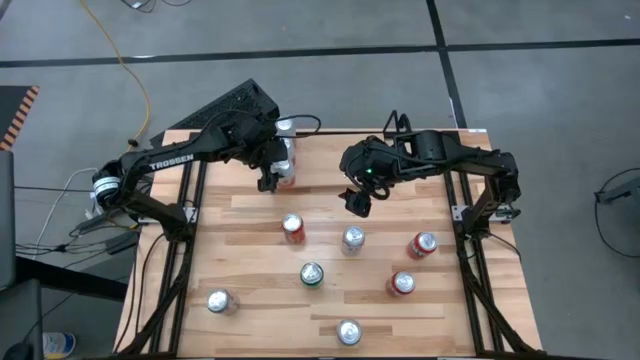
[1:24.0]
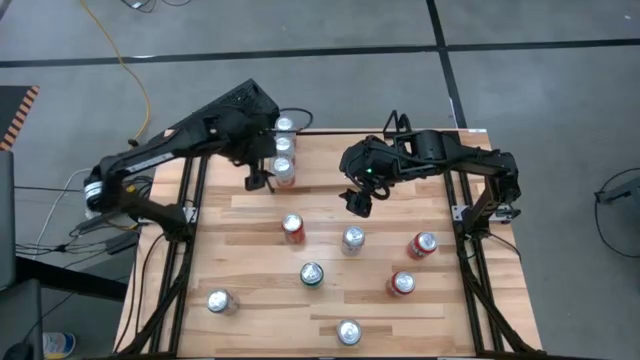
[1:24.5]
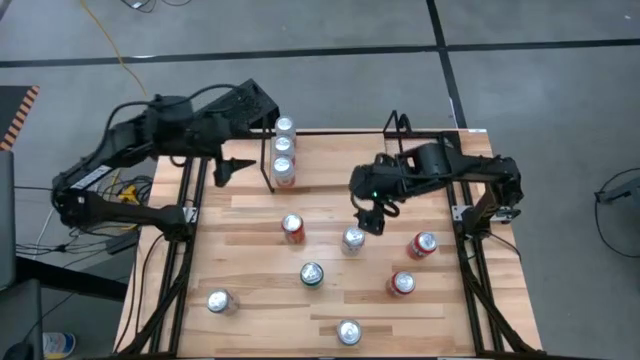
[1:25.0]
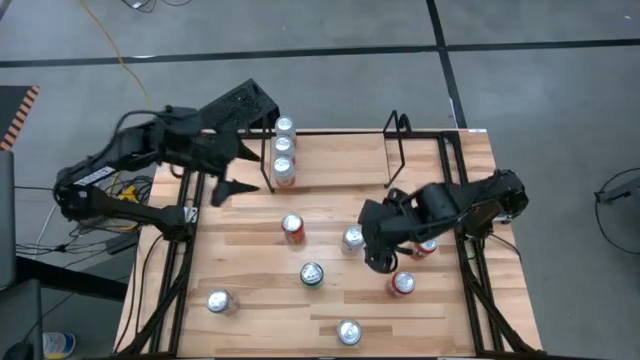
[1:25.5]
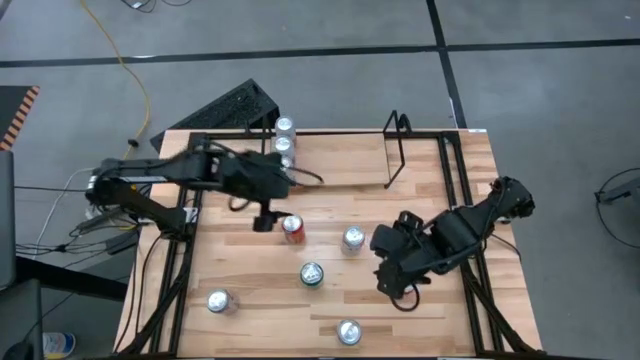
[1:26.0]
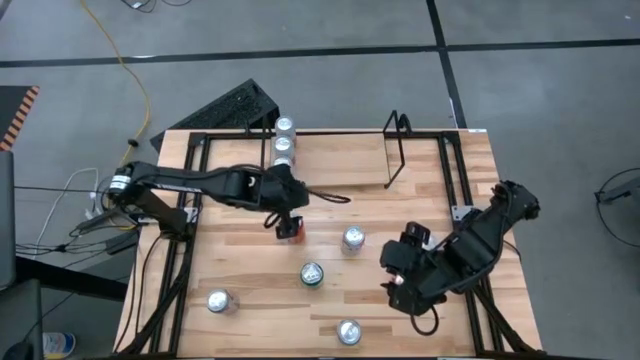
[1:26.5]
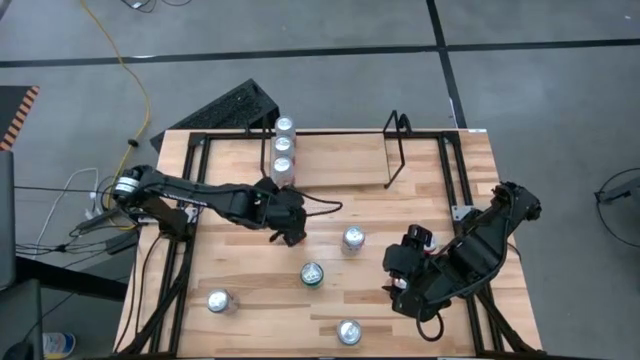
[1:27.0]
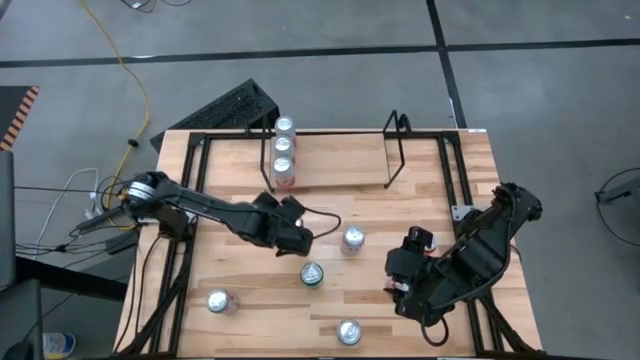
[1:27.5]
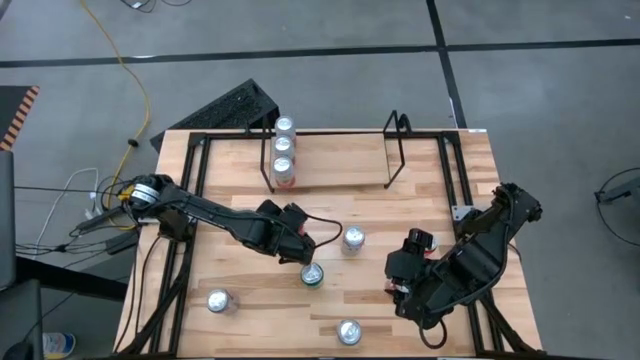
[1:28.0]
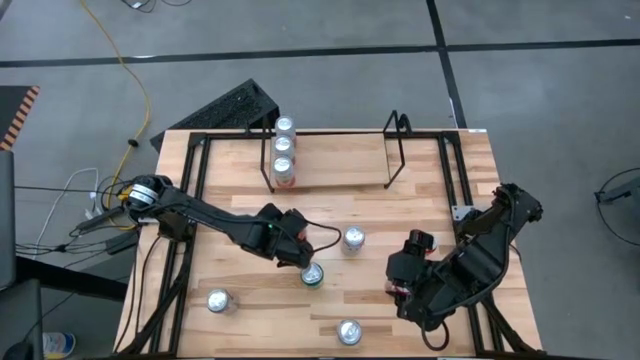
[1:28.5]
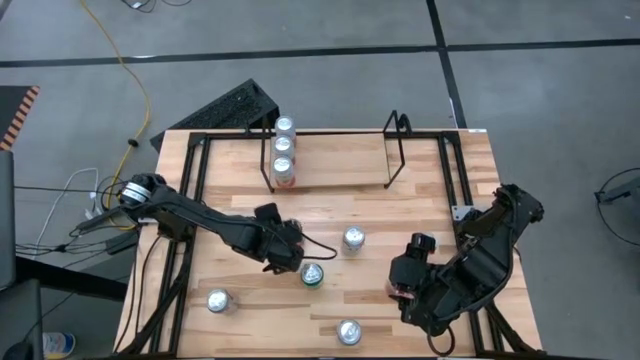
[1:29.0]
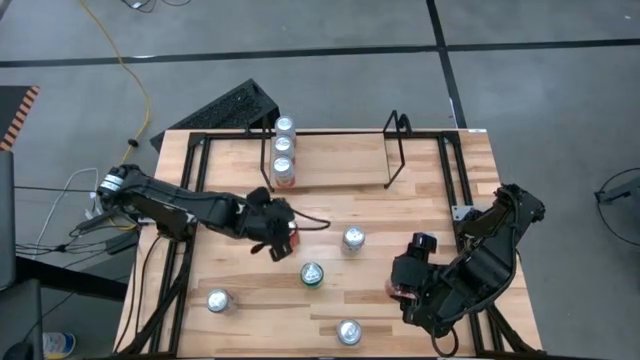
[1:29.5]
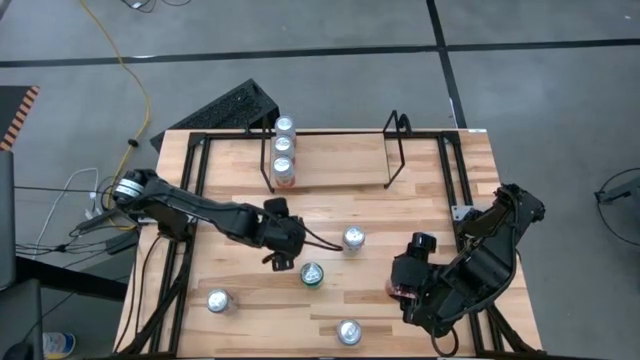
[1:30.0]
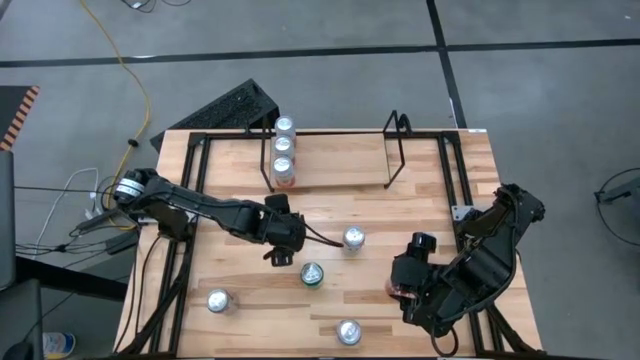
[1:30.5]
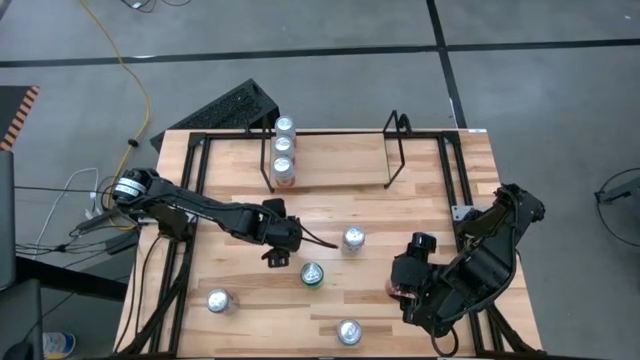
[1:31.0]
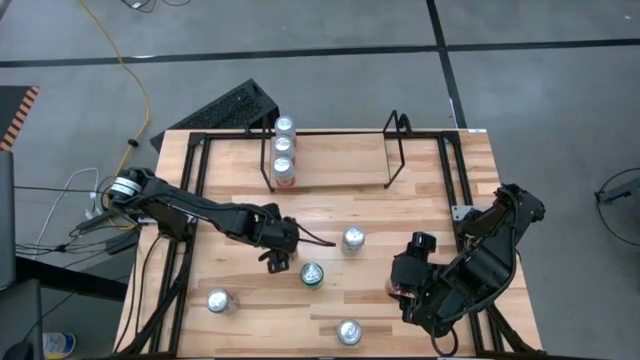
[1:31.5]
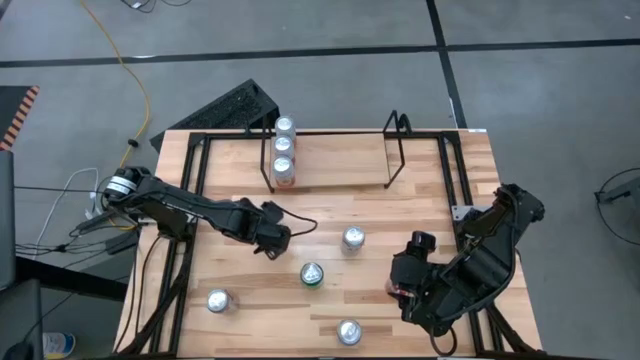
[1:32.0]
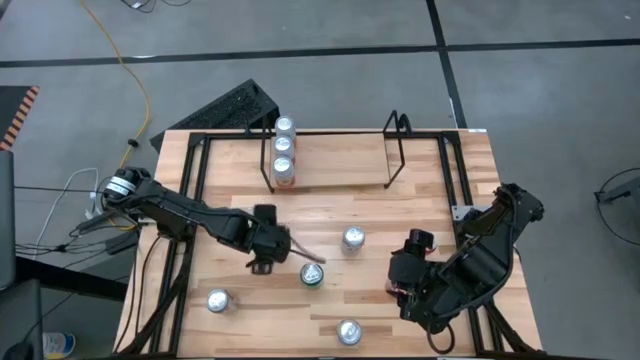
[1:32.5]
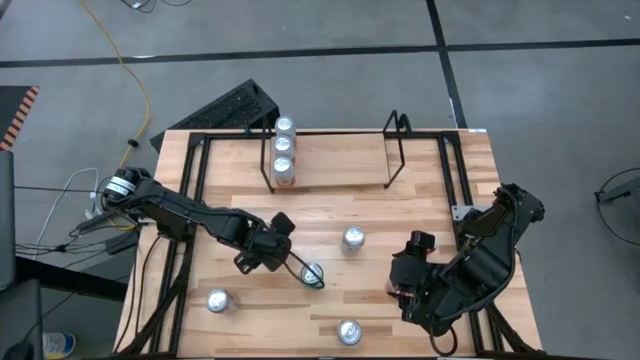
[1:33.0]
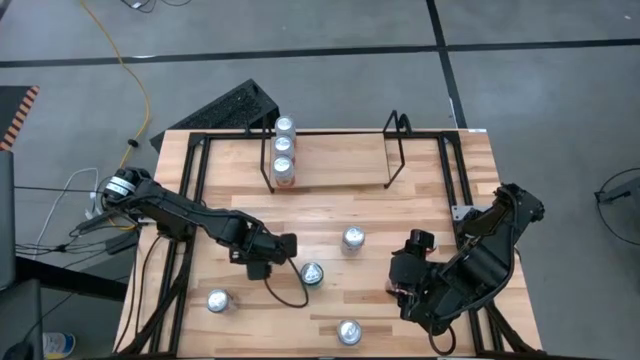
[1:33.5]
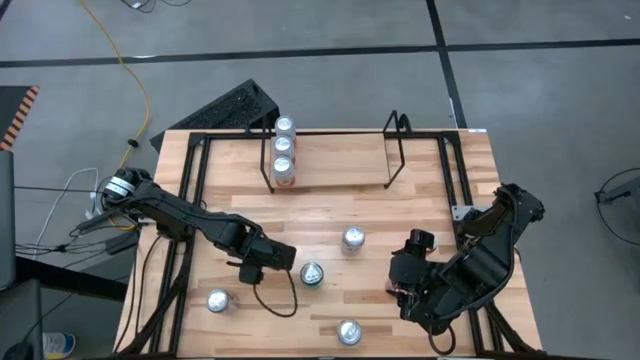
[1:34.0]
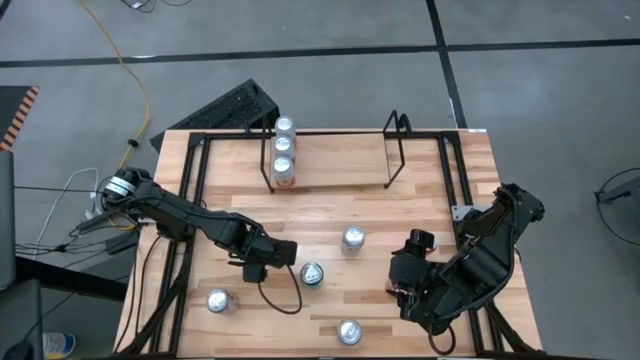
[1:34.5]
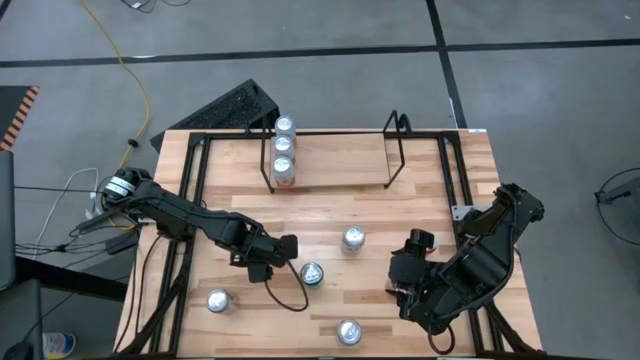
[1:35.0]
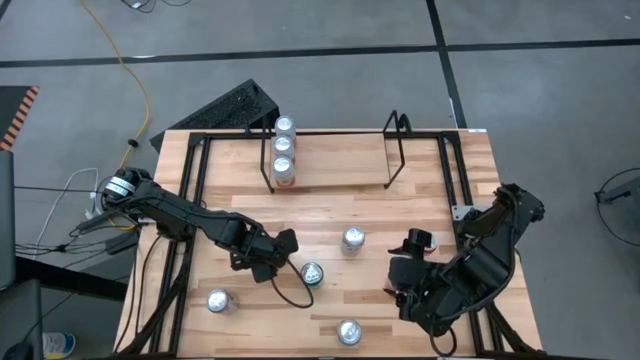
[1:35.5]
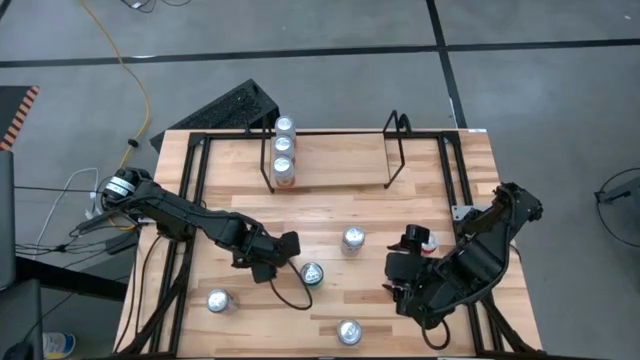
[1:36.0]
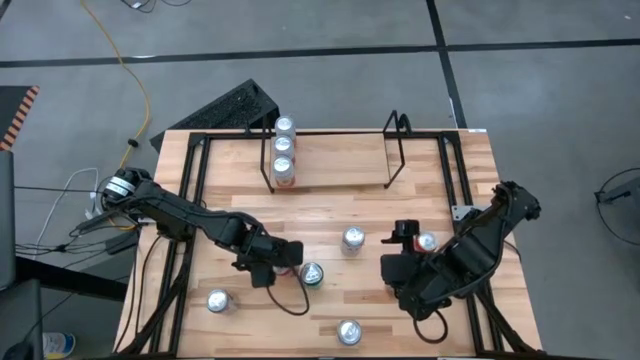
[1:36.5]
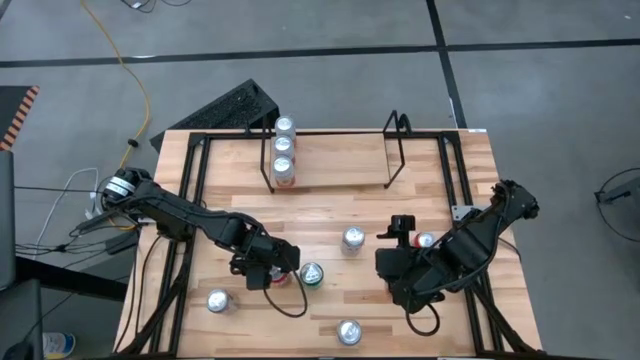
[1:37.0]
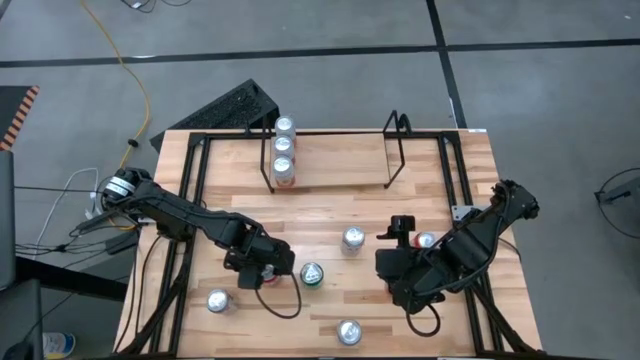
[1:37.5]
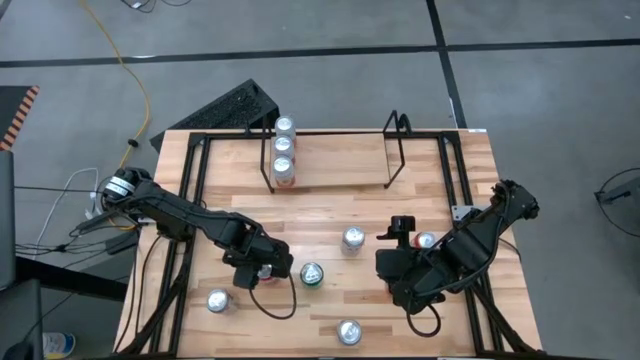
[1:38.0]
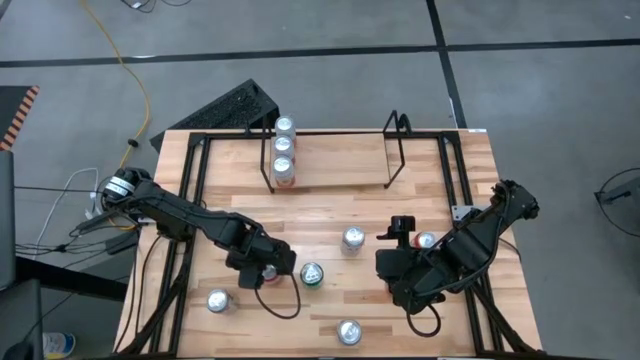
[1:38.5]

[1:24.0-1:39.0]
Task: Place canned beverage on shelf
Put the top left red soda can on the shelf
